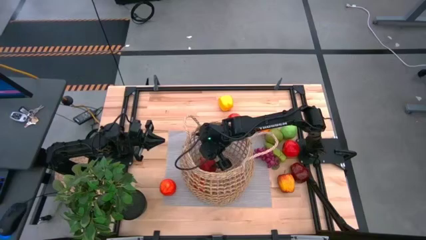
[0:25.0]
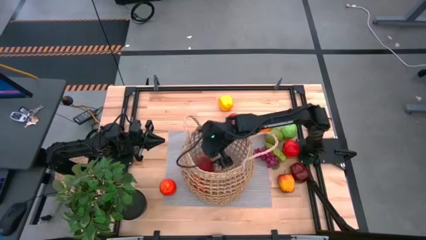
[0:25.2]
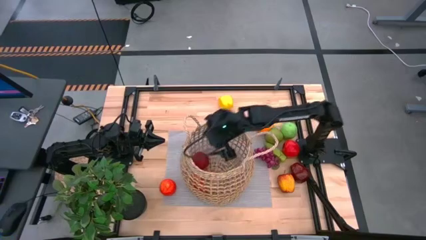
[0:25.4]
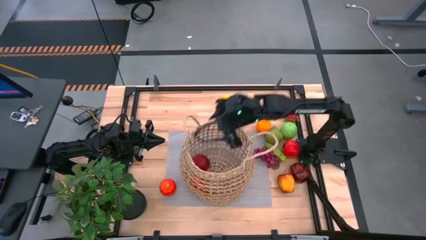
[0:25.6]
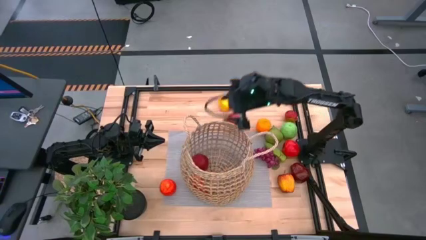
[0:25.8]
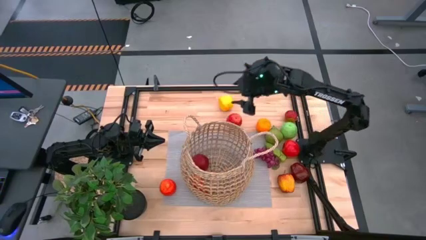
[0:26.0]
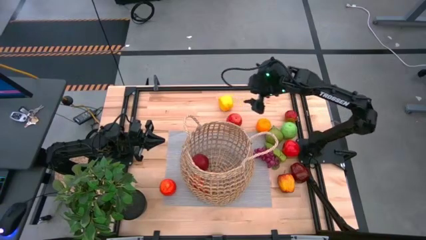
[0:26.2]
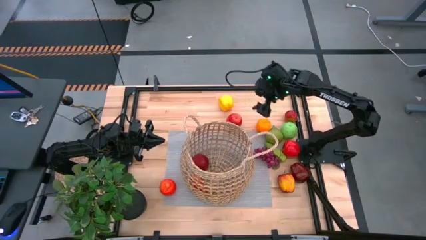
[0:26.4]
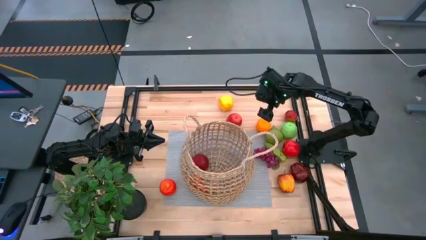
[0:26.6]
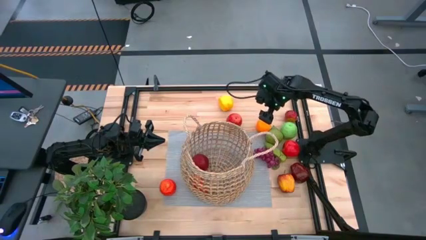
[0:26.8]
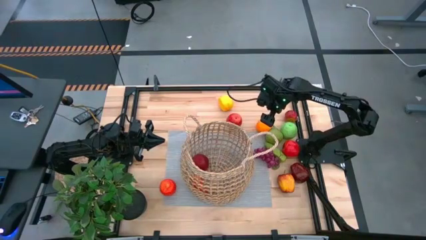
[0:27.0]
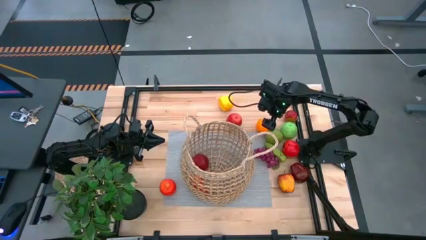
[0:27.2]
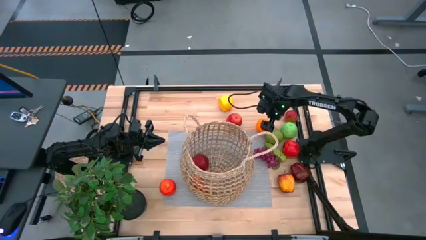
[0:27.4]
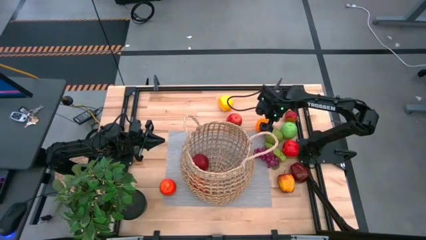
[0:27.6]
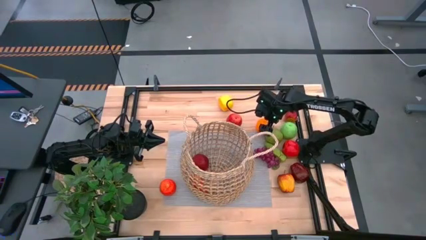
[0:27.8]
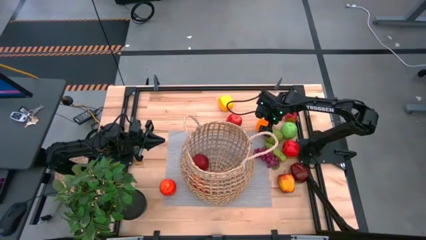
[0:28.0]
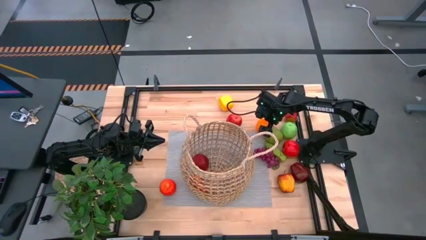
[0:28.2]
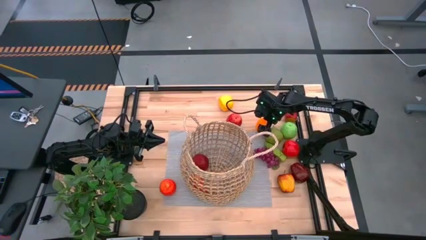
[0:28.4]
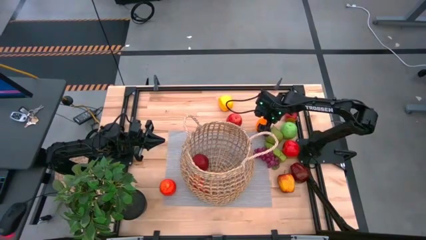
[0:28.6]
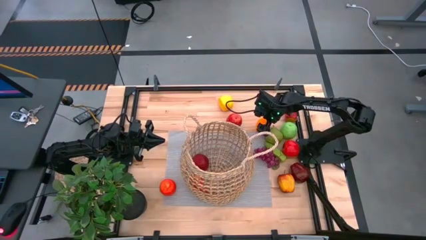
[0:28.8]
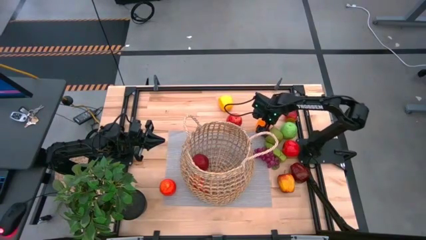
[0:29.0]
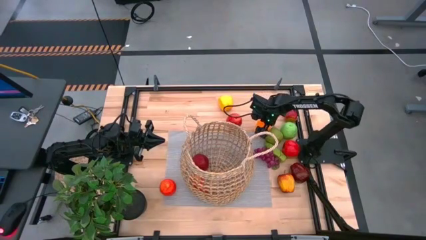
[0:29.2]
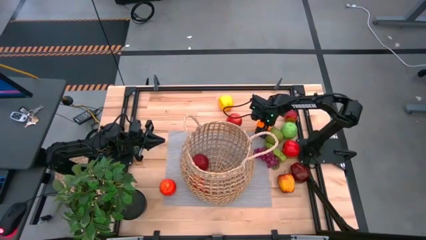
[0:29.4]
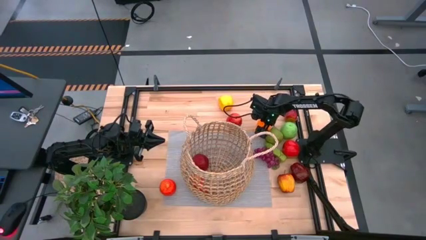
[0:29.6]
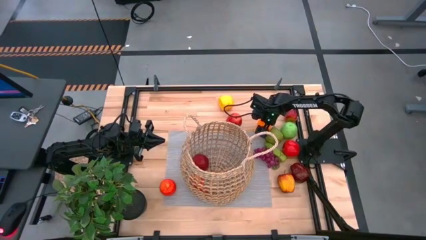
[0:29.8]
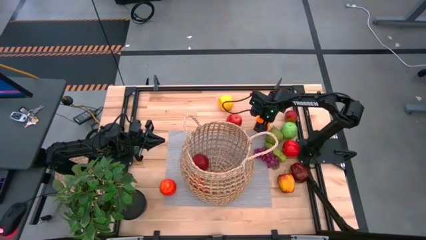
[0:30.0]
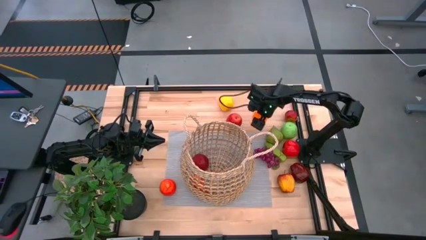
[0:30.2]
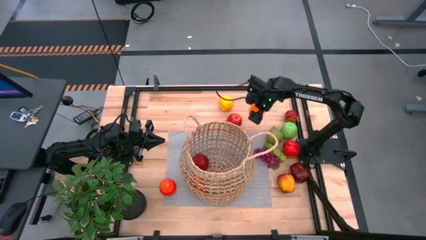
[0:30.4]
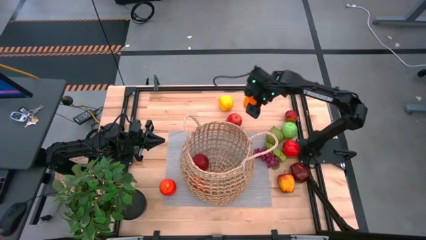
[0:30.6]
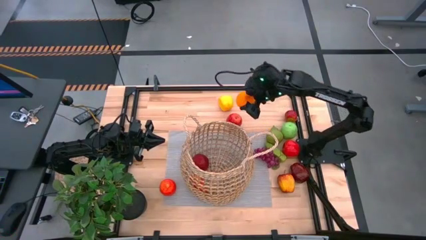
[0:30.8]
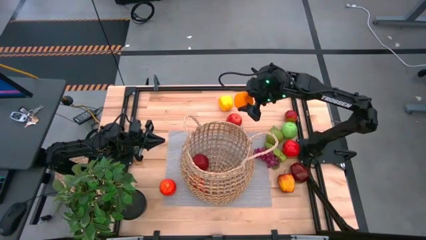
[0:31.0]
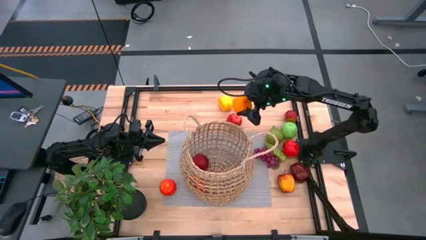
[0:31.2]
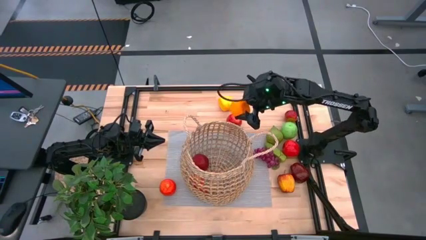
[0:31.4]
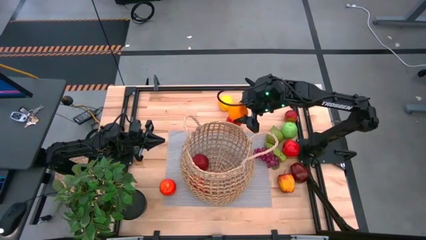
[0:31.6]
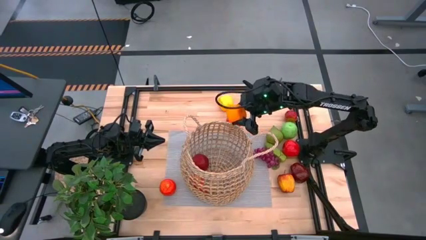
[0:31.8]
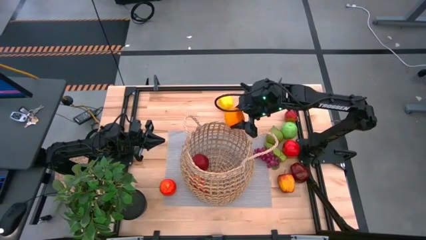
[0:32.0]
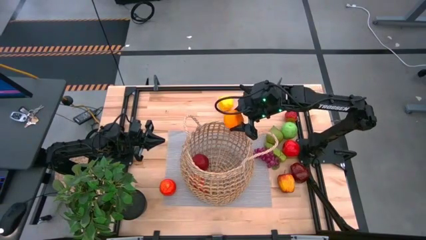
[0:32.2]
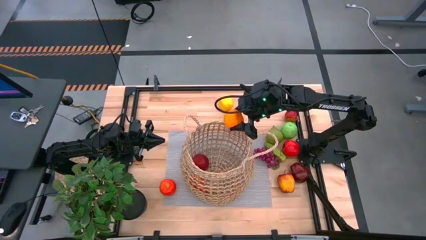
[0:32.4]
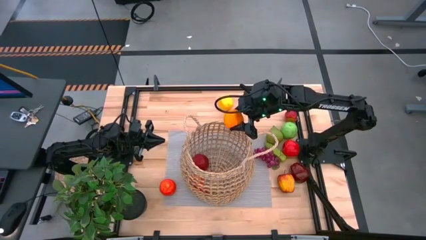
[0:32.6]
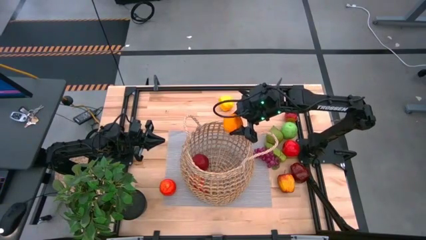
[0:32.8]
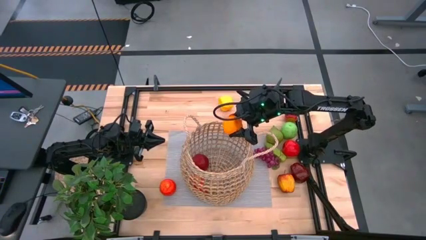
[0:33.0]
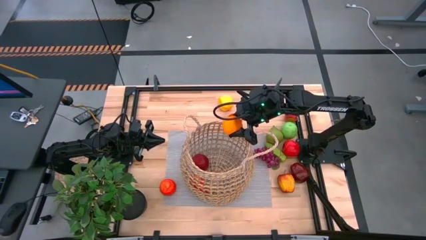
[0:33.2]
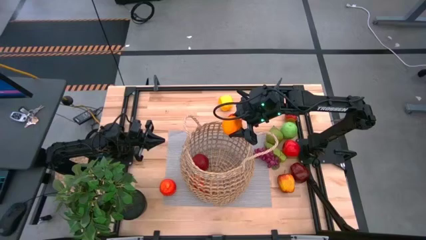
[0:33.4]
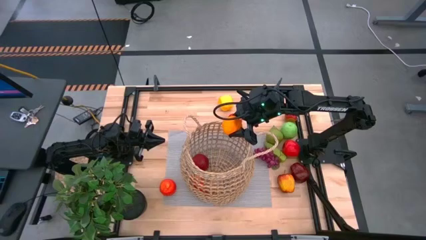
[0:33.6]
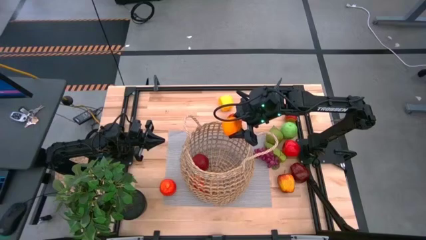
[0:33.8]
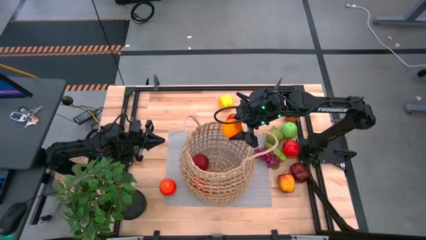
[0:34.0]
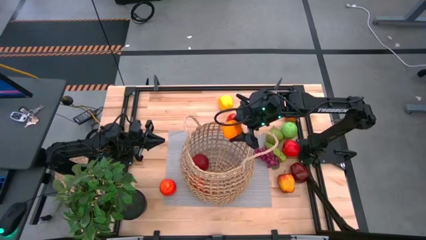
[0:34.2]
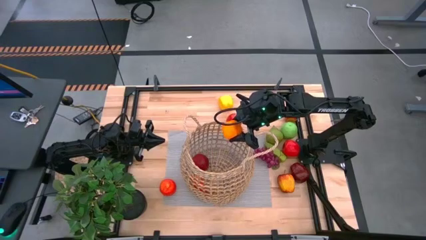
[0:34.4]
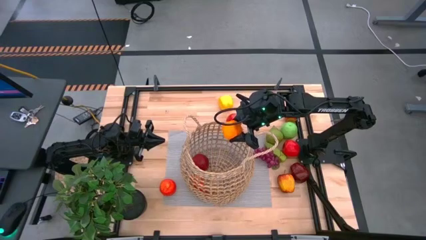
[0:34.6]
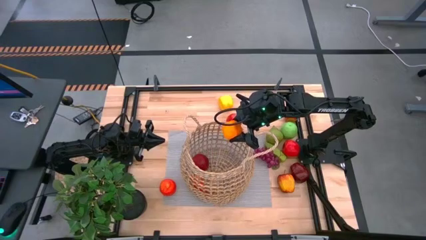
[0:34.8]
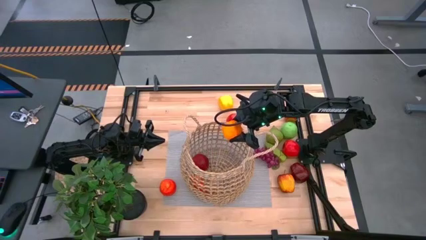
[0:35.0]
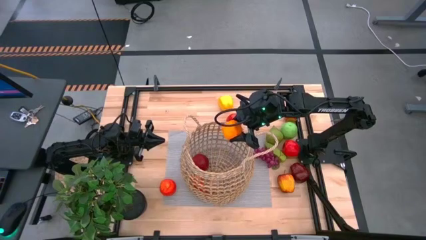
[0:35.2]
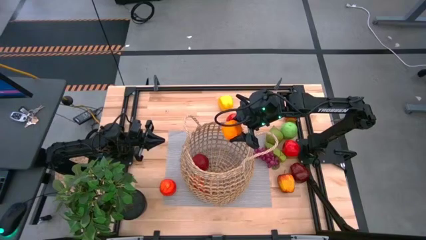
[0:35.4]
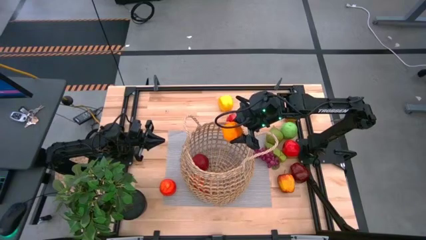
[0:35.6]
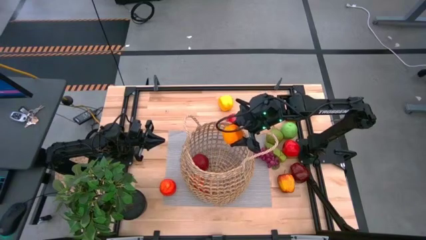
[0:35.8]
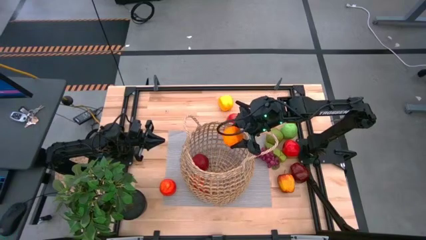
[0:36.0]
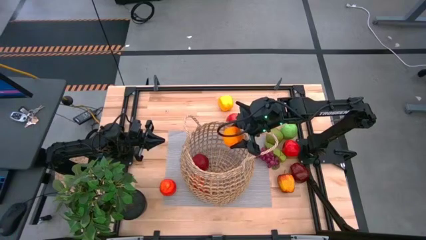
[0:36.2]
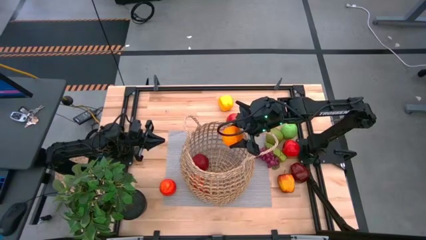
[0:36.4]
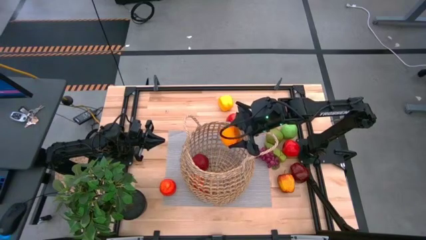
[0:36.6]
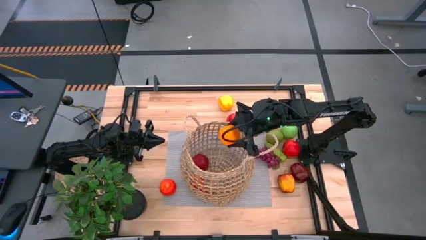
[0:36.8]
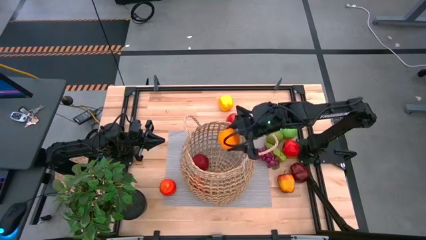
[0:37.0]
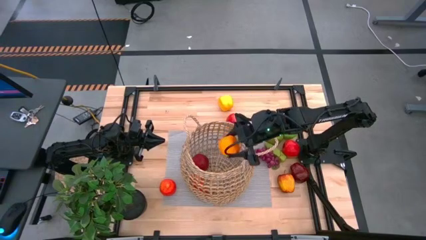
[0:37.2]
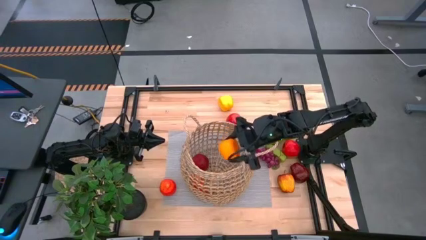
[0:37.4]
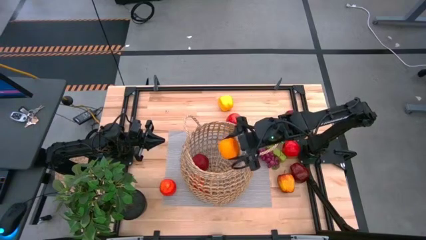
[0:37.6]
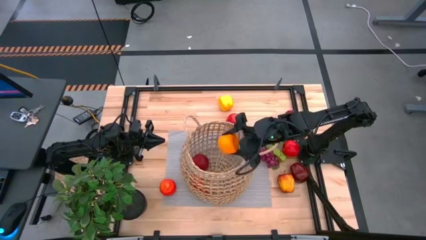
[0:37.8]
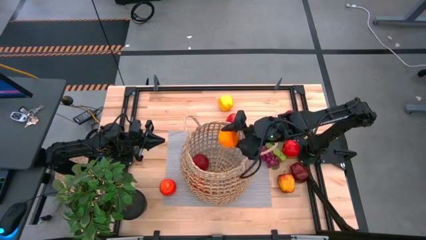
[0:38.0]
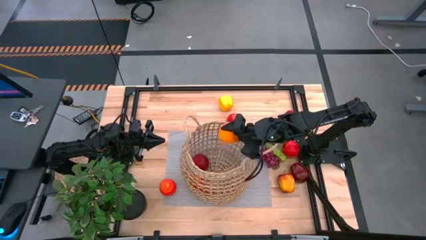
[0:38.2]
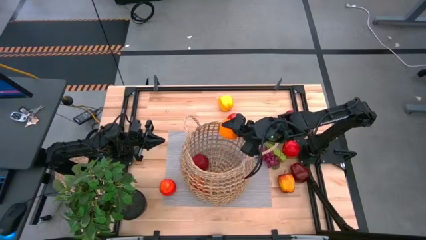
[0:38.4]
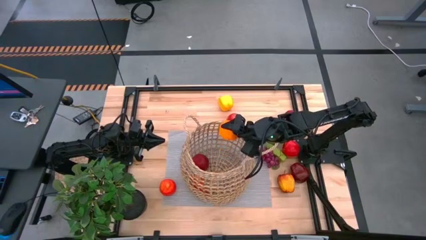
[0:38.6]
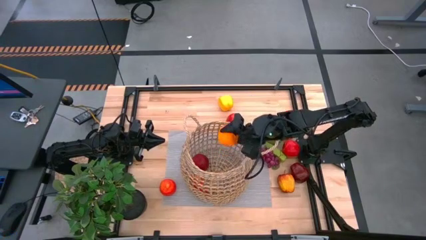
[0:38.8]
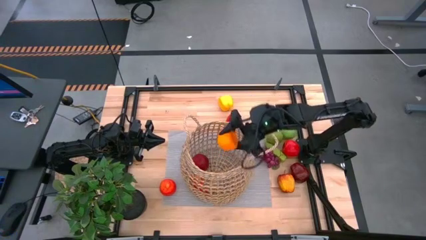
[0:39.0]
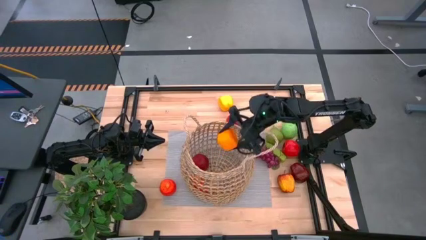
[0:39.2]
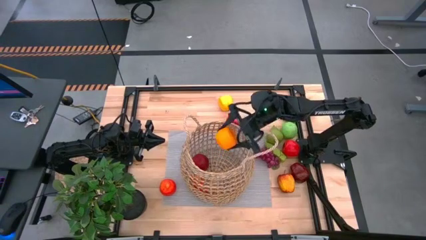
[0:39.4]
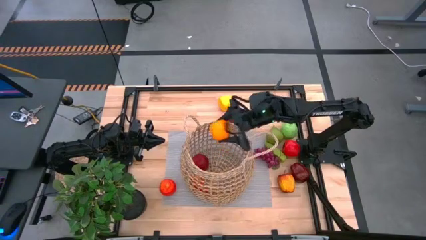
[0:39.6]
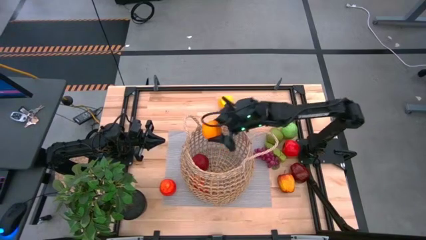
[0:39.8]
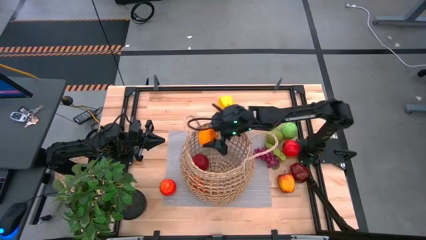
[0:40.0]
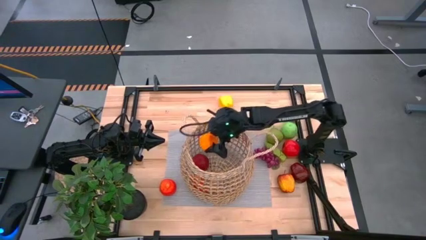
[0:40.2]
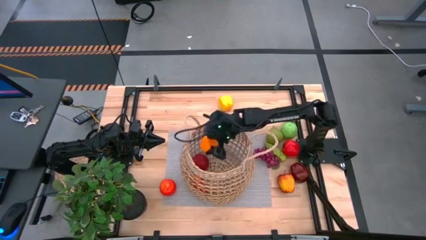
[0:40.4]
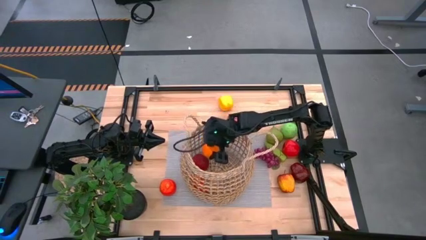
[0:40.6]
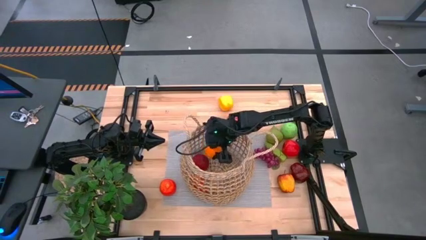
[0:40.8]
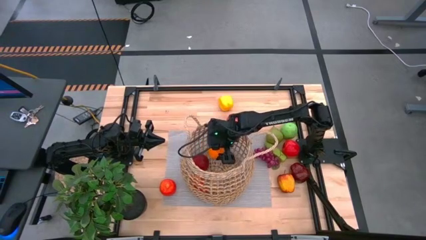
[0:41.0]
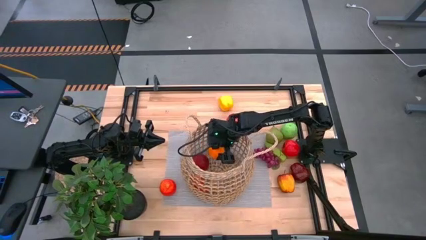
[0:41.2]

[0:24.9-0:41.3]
Task: Build produce basket
Put the orange into the brown basket

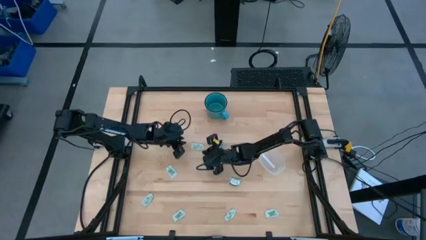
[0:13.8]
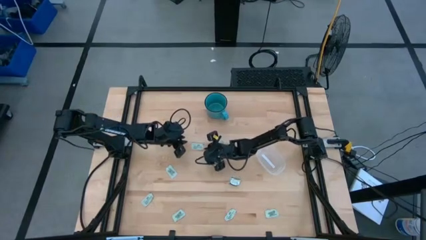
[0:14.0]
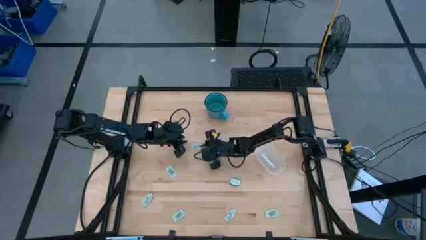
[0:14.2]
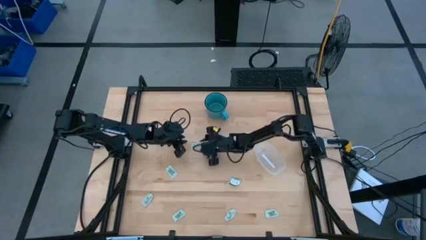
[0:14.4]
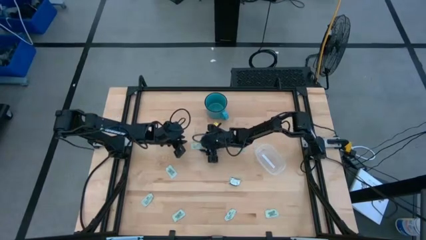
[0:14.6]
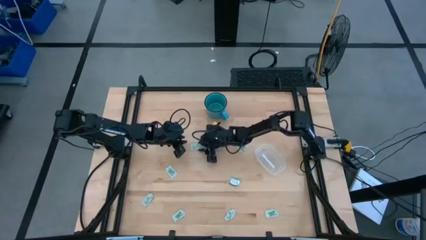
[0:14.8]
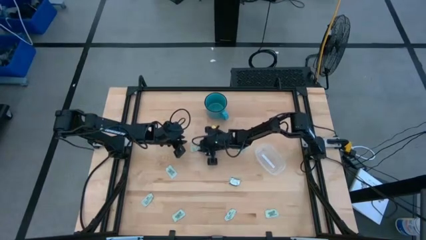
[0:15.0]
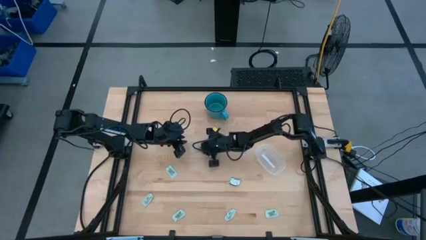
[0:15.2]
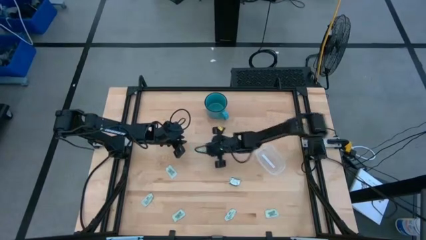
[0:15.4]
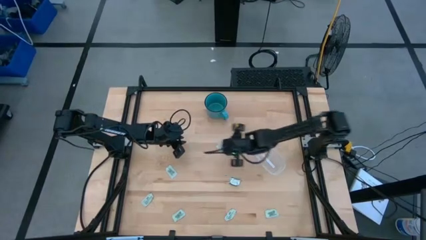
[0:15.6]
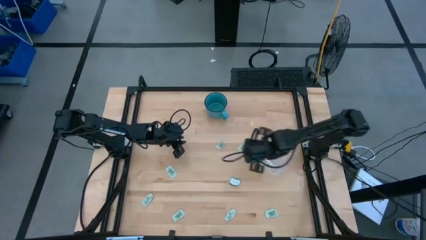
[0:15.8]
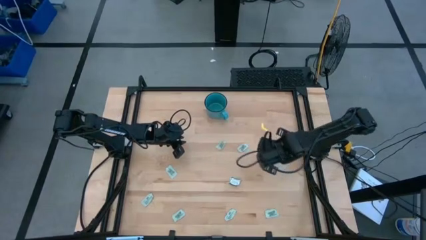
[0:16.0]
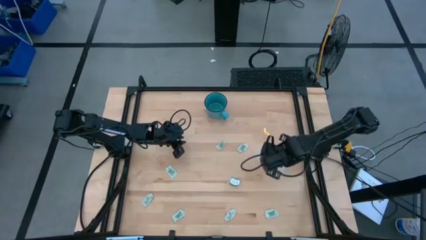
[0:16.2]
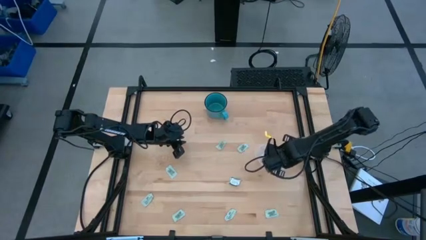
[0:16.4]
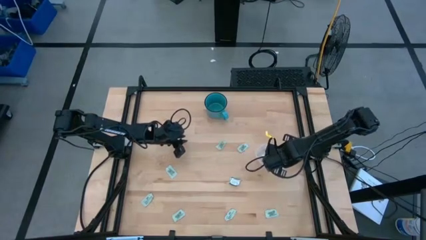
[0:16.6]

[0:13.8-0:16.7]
Task: Pick and place Stevia / Truvia into bins
Put the white stevia packet into the transparent container
